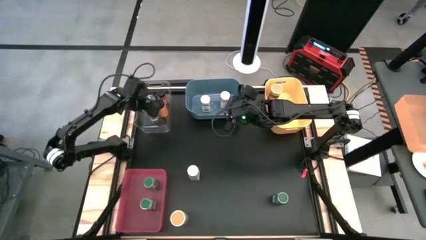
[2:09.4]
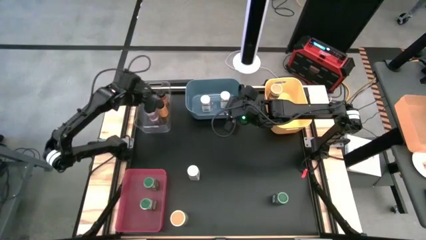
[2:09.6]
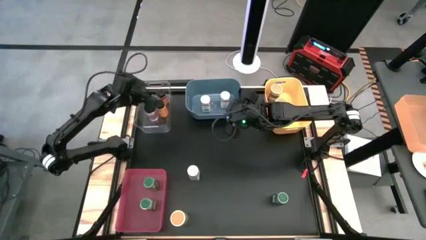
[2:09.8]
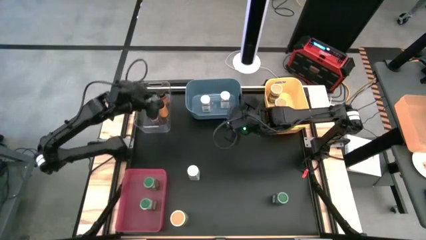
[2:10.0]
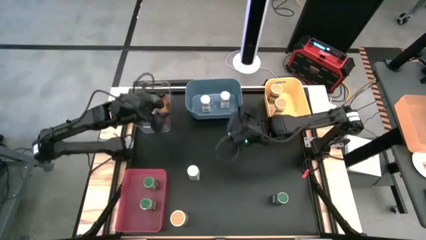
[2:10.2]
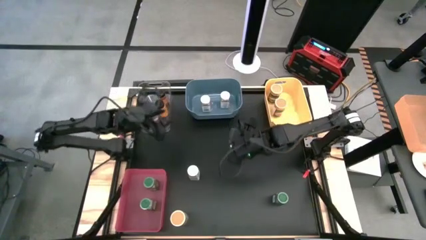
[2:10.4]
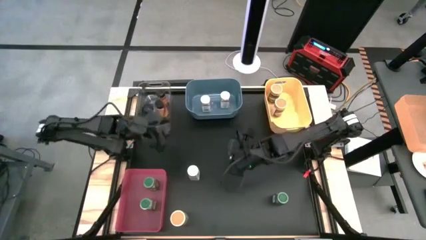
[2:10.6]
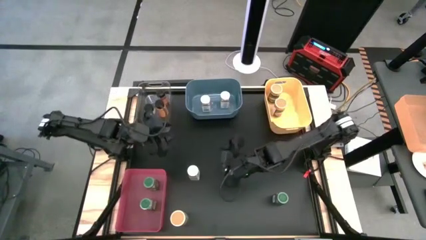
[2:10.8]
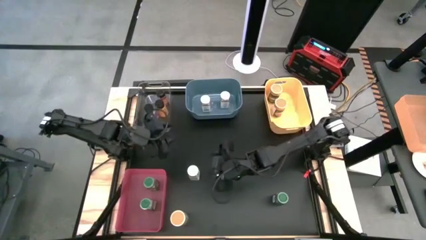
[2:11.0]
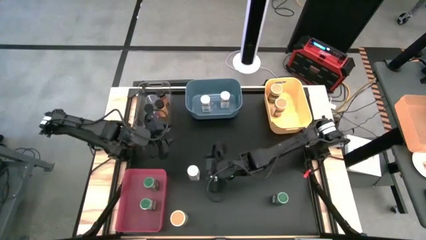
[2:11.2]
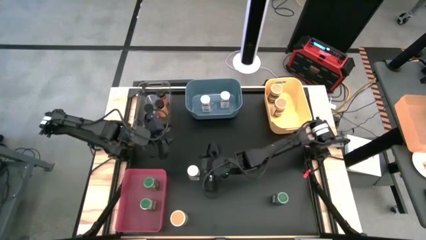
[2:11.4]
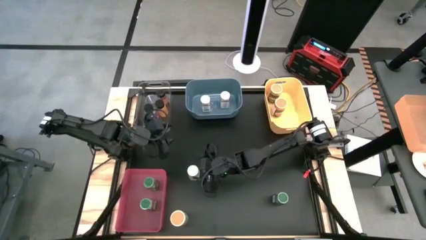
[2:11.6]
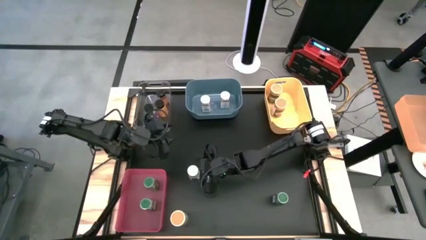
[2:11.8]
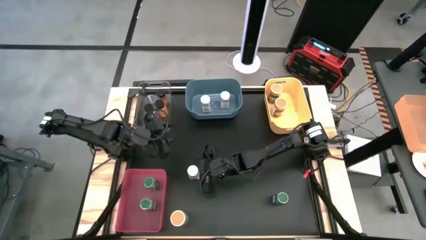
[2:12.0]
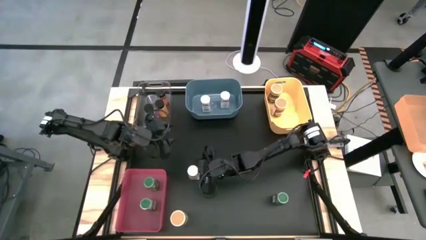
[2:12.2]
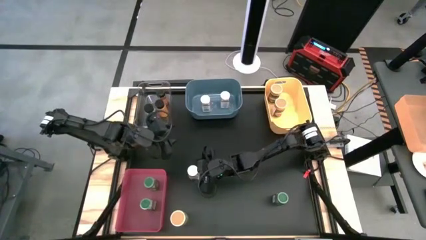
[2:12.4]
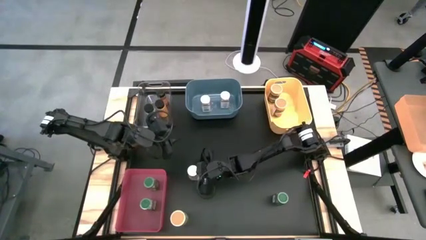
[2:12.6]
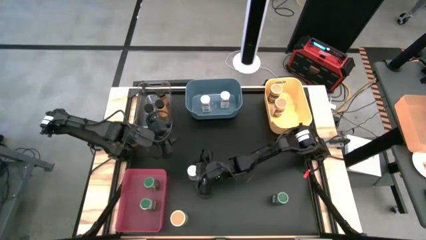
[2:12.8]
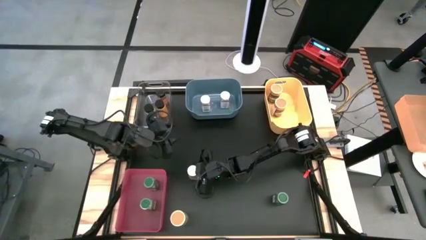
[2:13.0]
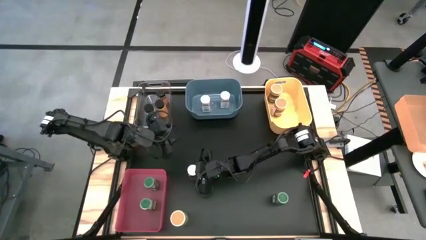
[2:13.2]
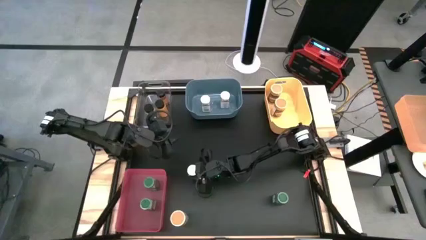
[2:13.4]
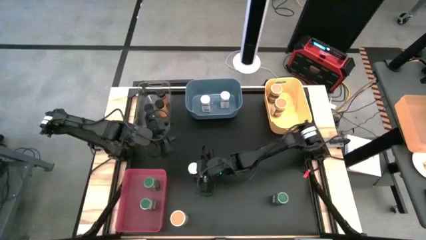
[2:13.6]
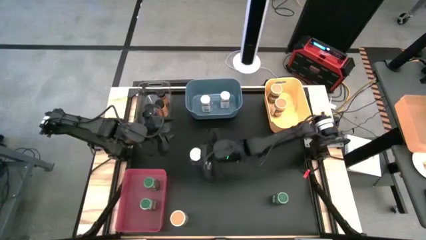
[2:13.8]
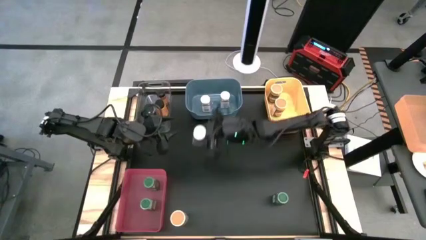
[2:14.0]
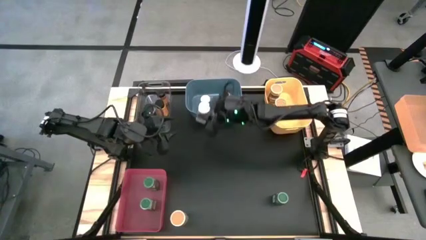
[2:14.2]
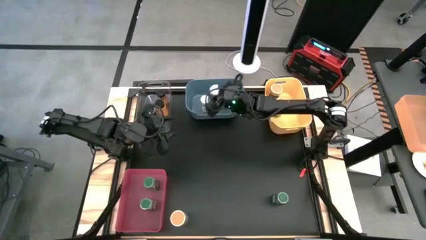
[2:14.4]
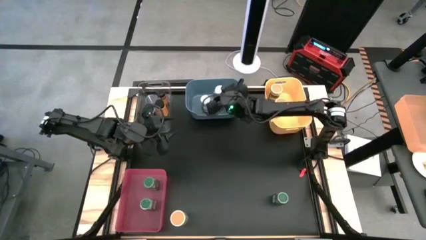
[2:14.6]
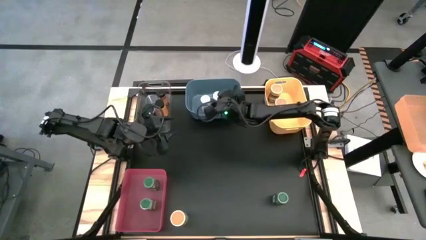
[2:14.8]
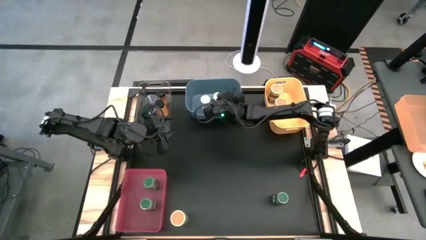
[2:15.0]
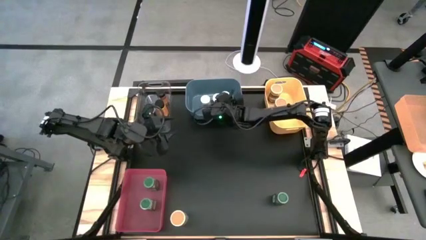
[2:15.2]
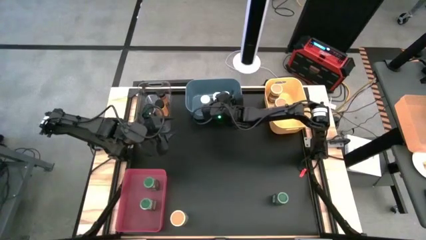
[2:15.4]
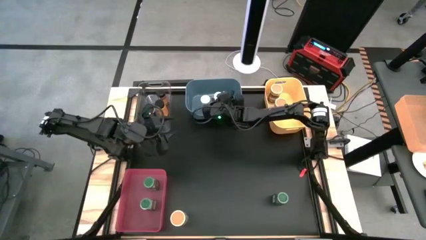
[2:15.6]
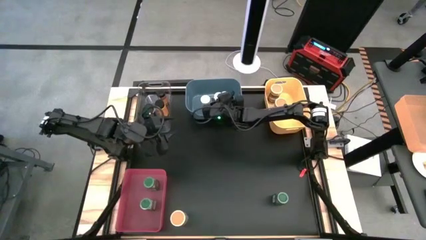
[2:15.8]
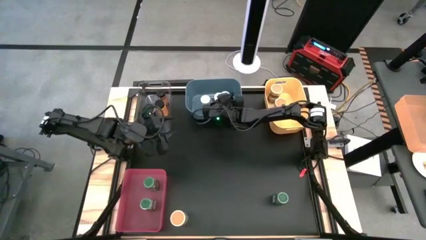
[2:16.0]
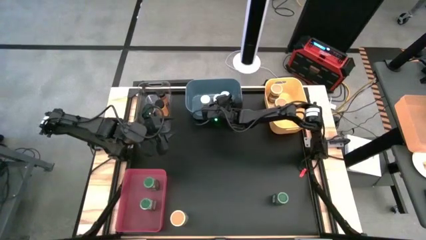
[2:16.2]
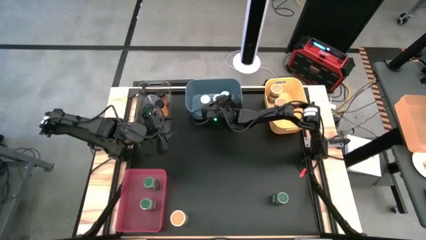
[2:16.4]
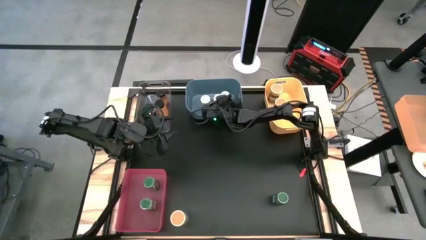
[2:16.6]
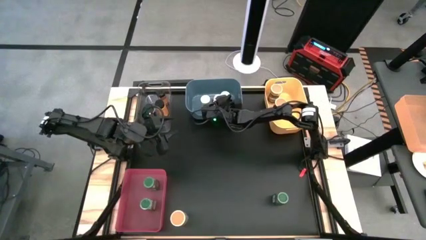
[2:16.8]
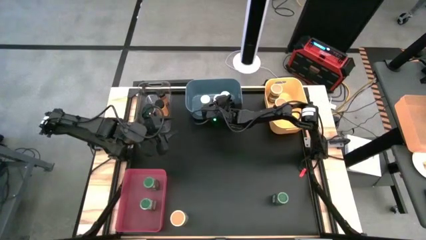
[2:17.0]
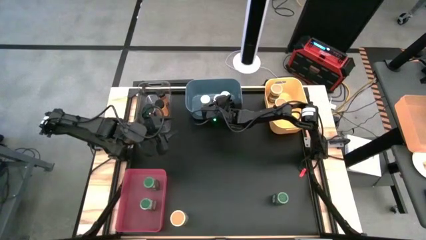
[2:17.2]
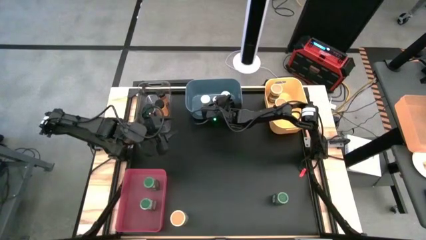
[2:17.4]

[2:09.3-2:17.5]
Task: Sort spices by type
Put the white seasoning bottle into the blue bin

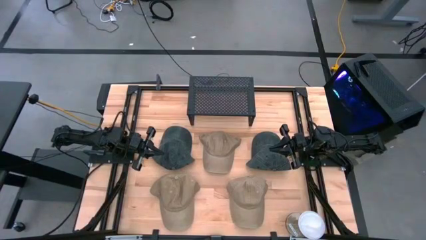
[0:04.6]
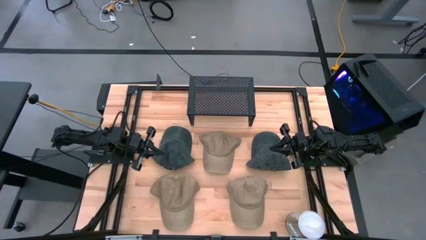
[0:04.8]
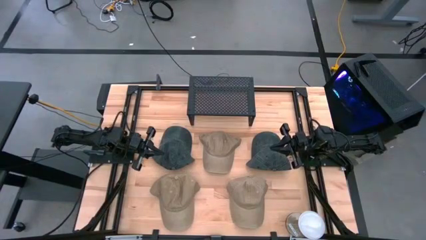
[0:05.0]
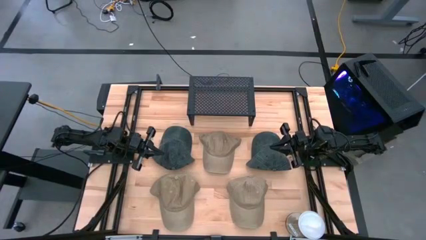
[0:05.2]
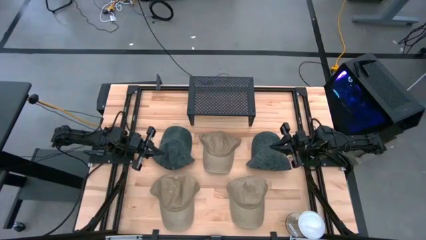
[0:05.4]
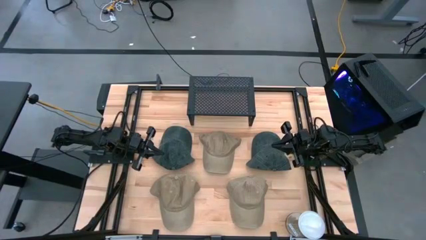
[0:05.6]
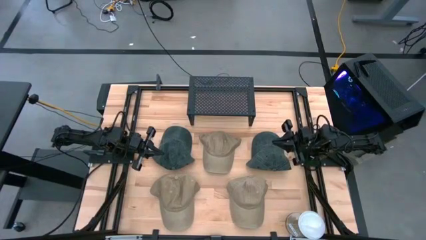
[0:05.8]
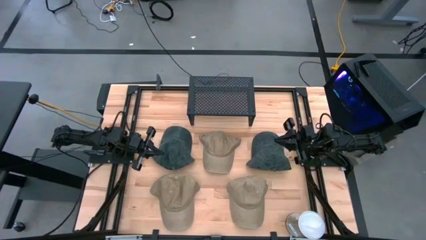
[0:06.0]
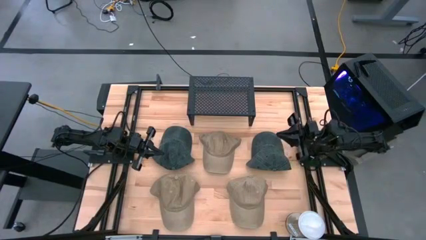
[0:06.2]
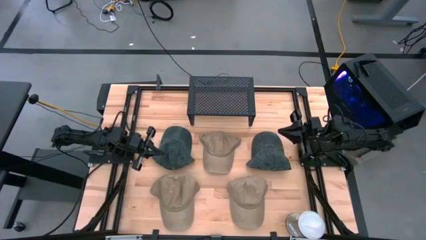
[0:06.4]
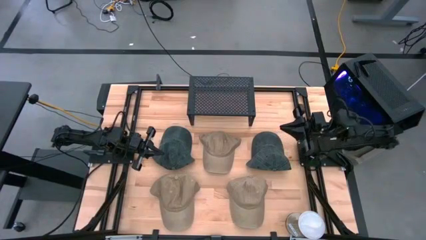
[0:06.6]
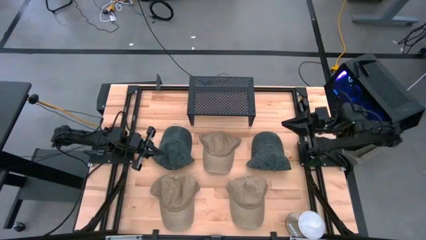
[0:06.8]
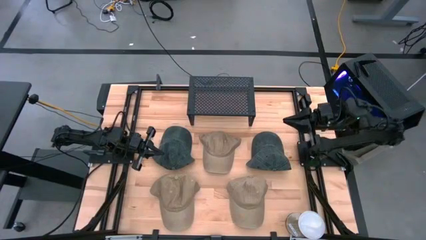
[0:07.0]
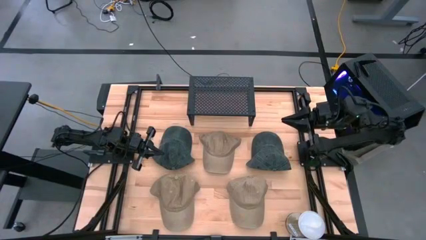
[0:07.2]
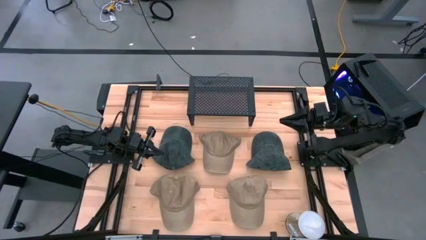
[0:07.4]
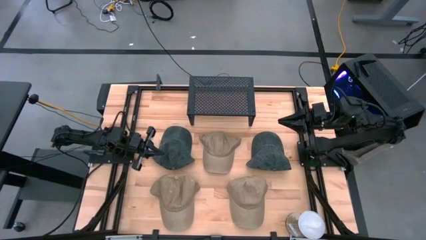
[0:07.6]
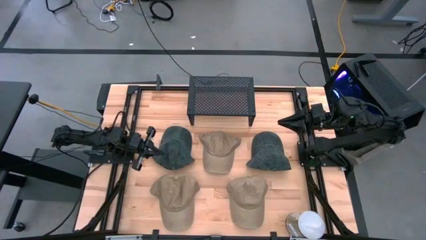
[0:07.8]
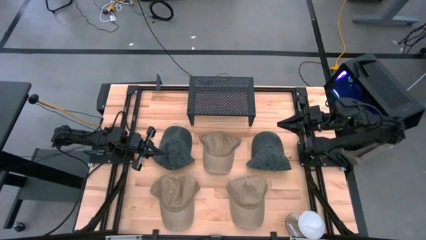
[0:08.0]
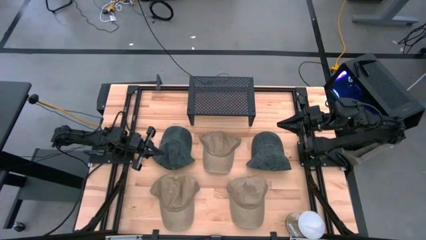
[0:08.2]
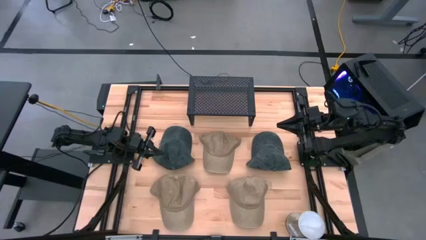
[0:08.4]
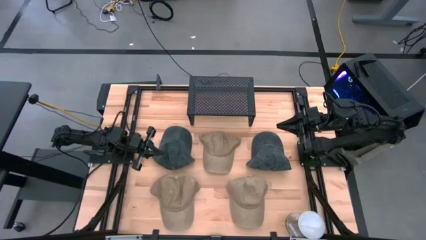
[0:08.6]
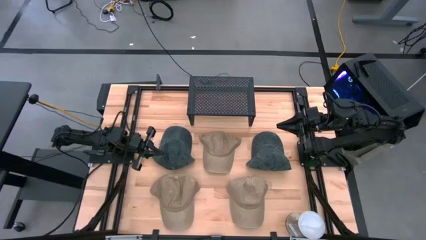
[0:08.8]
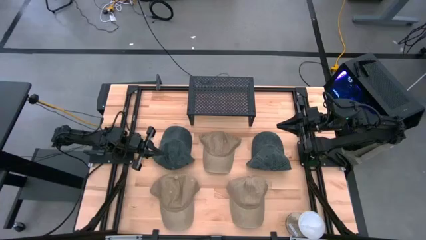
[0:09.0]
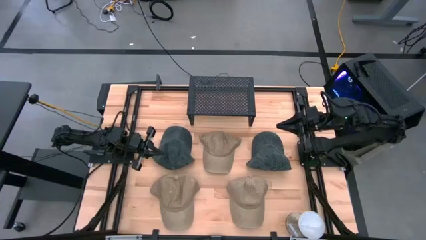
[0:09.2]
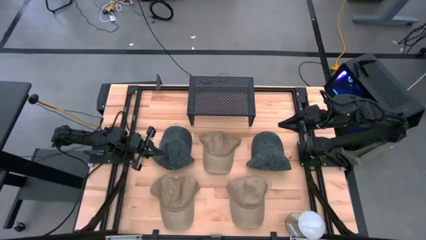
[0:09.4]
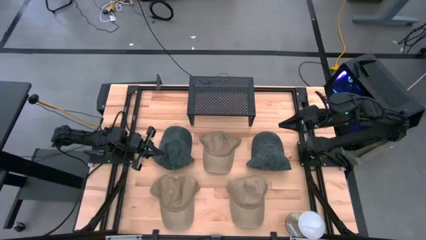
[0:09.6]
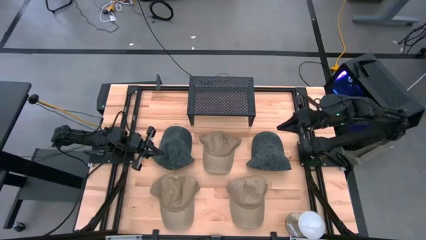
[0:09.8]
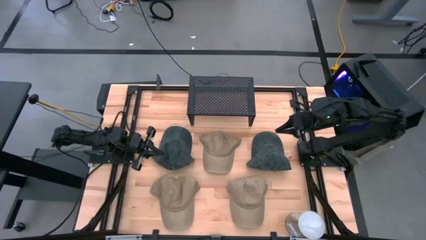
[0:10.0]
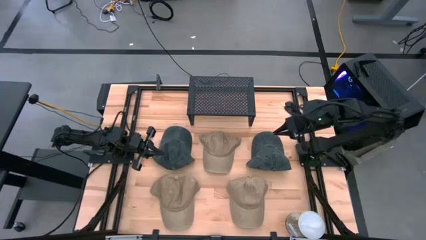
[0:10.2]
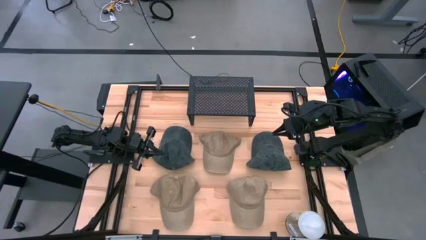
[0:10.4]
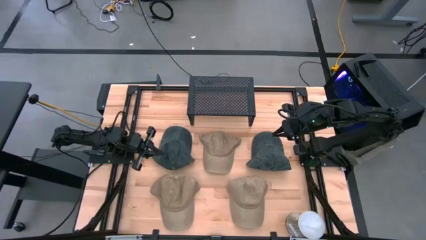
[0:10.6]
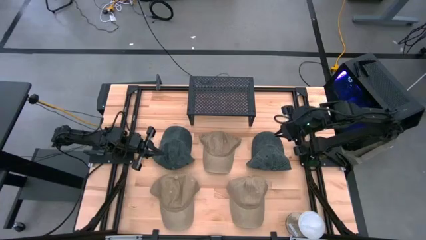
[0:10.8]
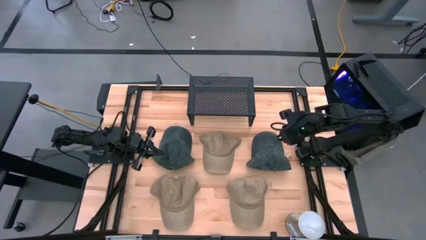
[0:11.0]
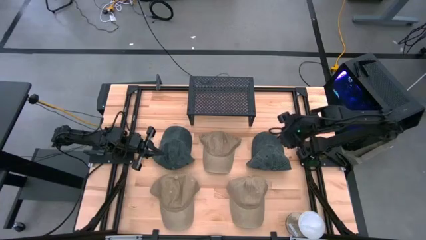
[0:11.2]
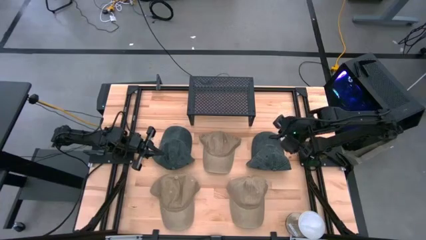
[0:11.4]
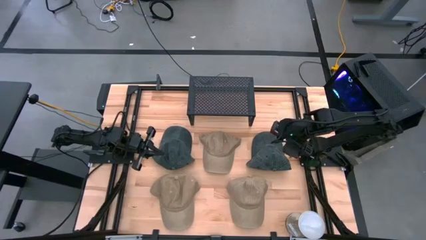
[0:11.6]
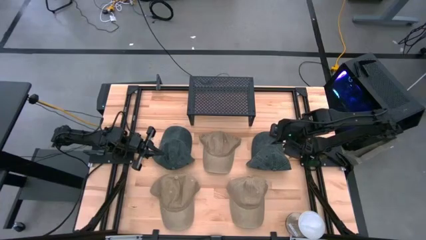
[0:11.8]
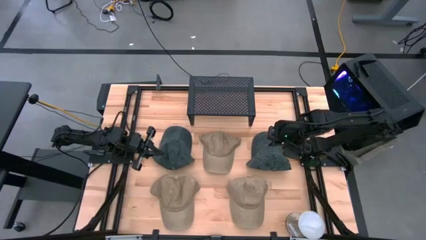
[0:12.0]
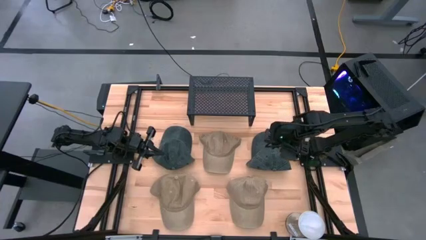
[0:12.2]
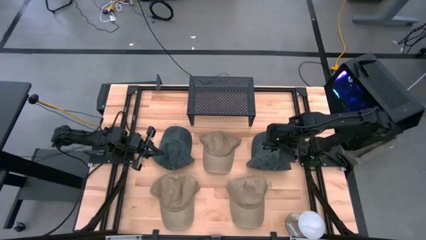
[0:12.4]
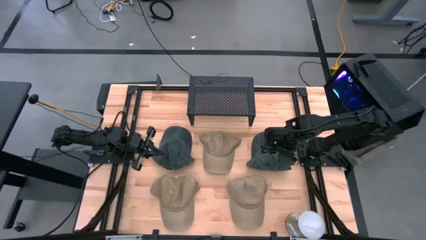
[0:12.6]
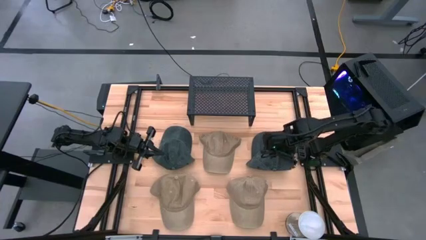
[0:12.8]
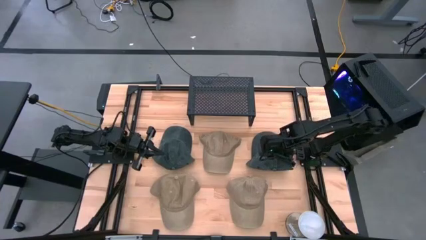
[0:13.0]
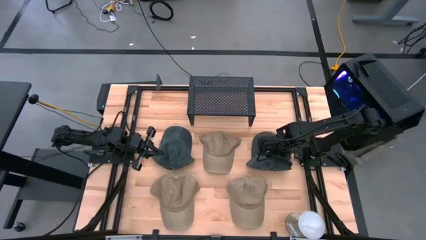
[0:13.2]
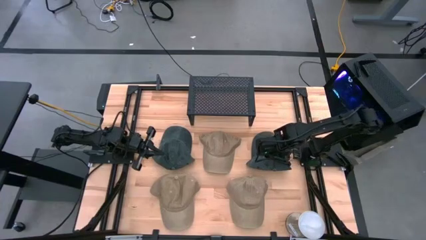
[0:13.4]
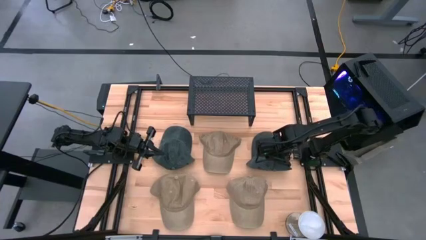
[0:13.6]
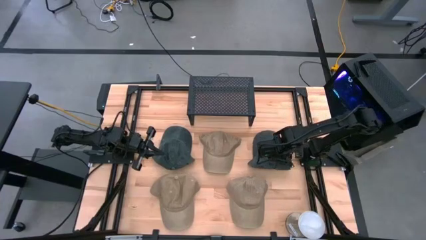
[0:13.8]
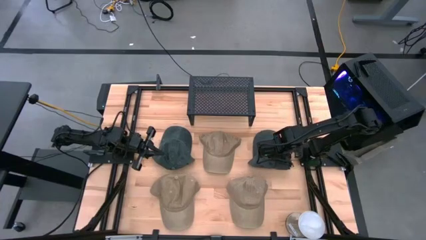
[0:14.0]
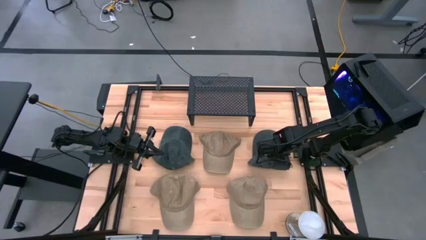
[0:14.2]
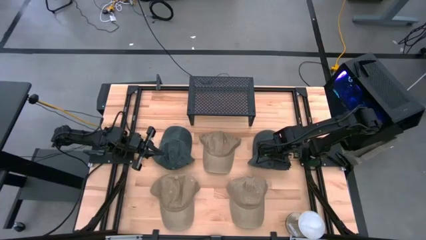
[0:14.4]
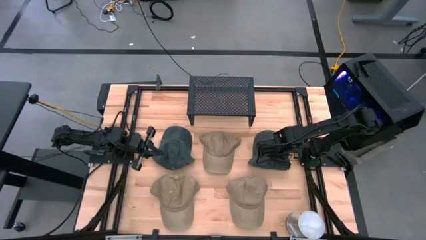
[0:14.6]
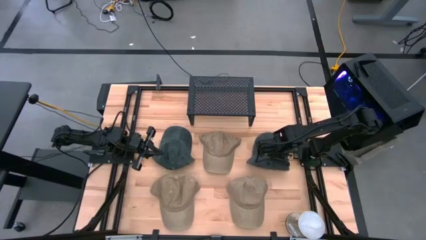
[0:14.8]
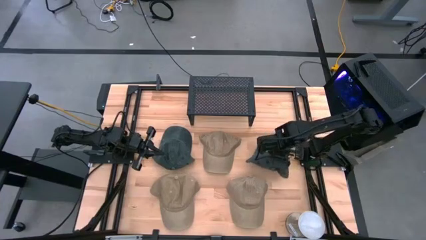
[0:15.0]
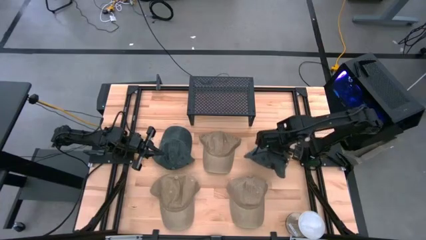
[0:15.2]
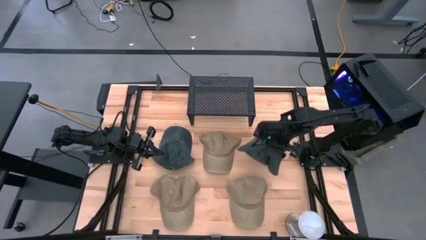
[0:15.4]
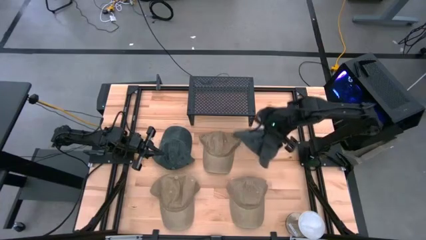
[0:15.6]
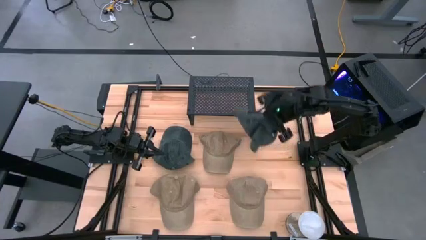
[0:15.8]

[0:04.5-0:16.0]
Task: Pick & Place hat
Put the right black cap on the shelf
